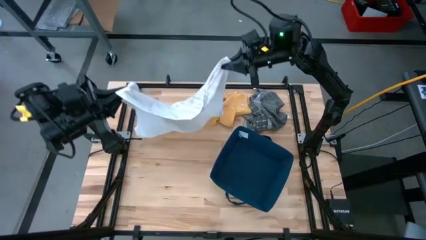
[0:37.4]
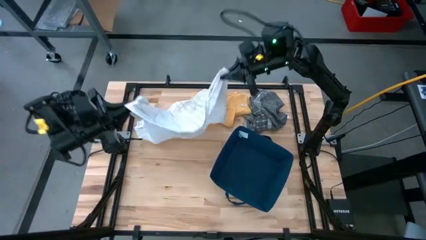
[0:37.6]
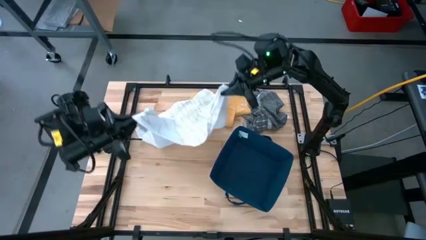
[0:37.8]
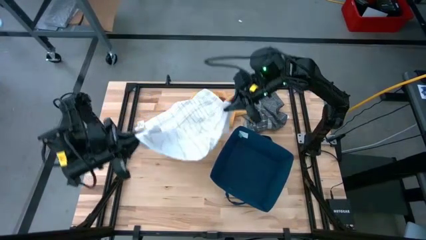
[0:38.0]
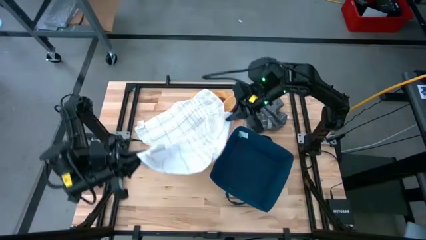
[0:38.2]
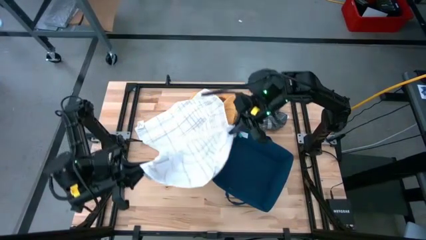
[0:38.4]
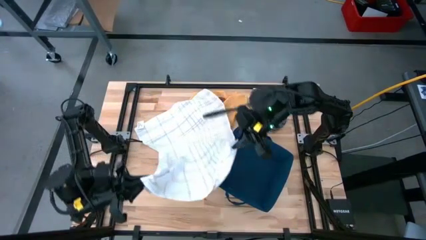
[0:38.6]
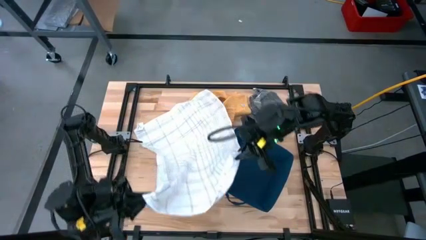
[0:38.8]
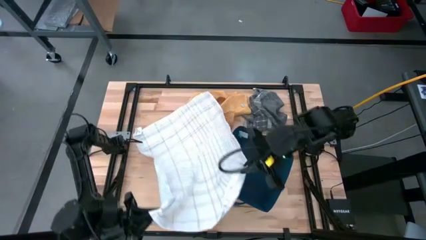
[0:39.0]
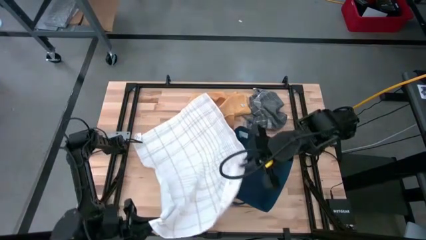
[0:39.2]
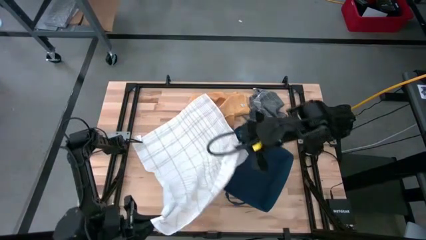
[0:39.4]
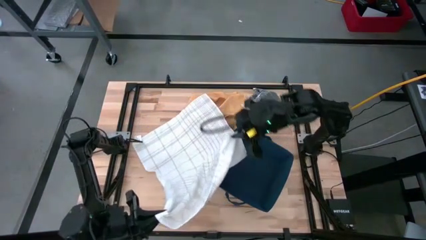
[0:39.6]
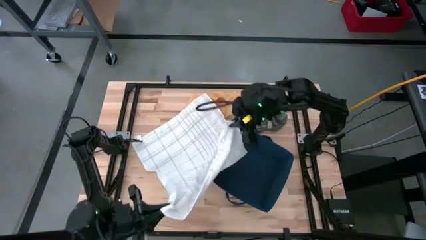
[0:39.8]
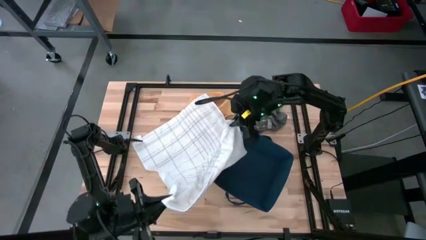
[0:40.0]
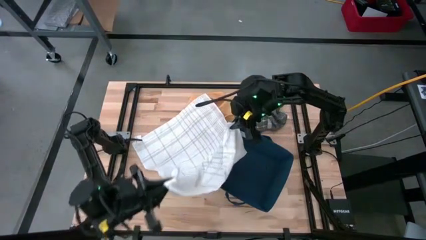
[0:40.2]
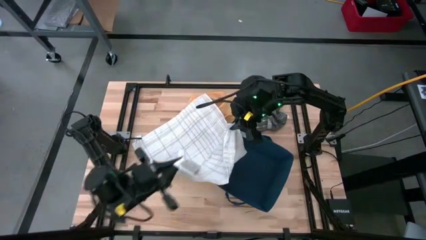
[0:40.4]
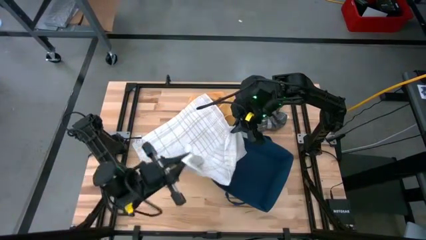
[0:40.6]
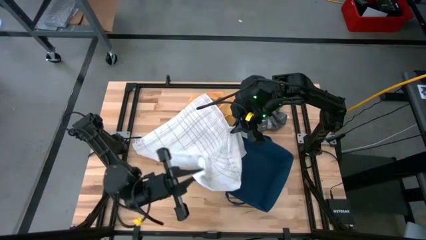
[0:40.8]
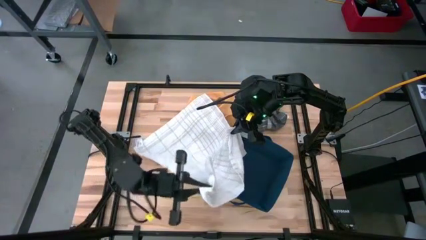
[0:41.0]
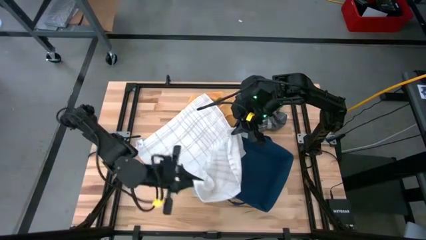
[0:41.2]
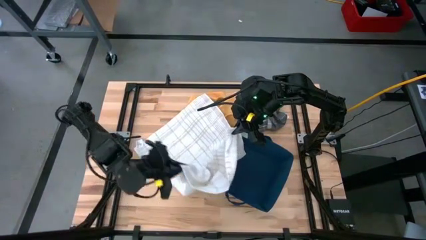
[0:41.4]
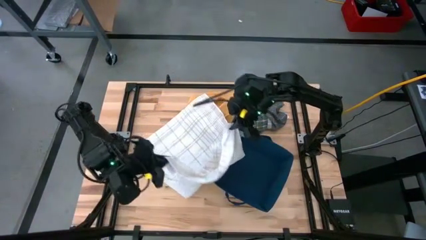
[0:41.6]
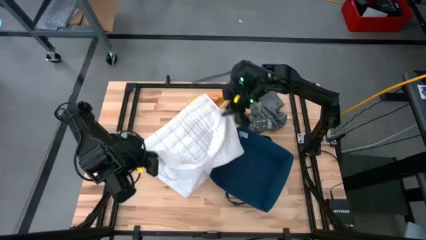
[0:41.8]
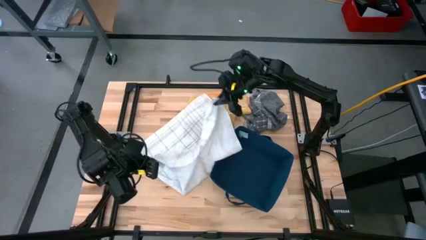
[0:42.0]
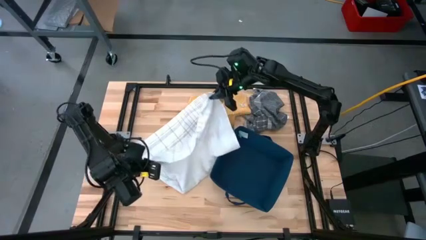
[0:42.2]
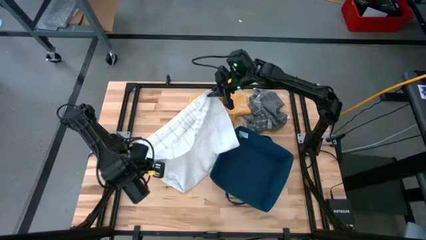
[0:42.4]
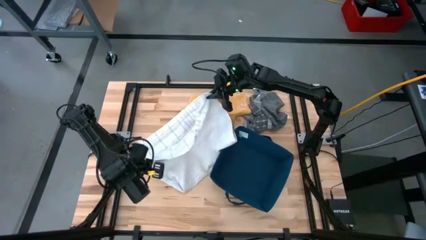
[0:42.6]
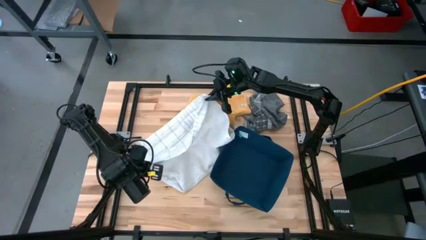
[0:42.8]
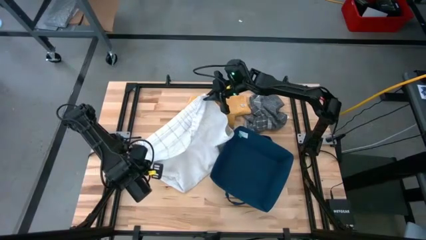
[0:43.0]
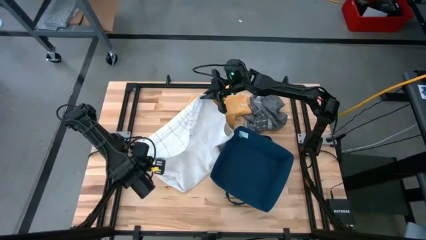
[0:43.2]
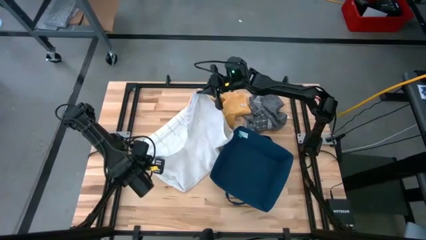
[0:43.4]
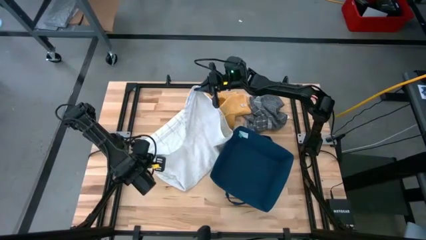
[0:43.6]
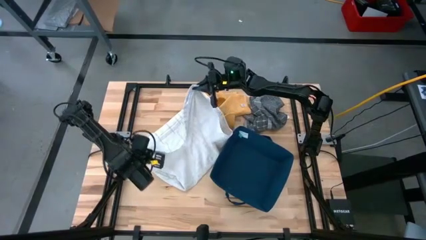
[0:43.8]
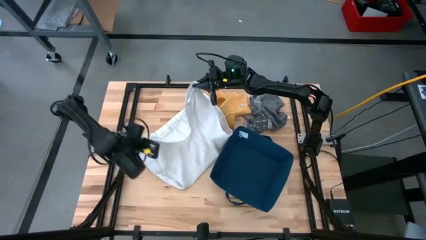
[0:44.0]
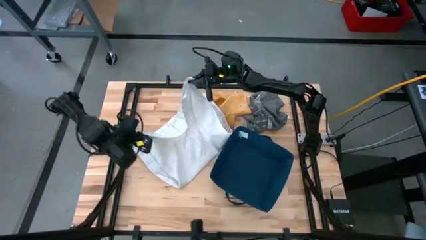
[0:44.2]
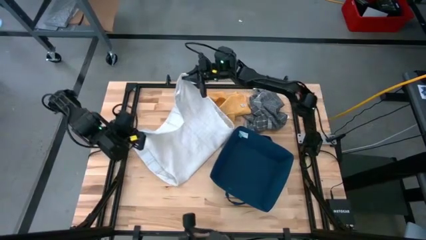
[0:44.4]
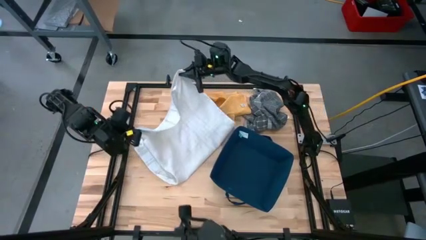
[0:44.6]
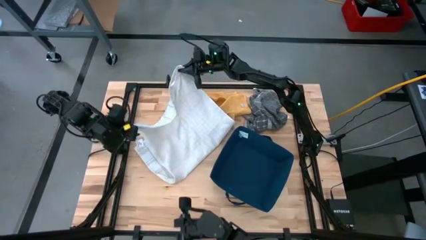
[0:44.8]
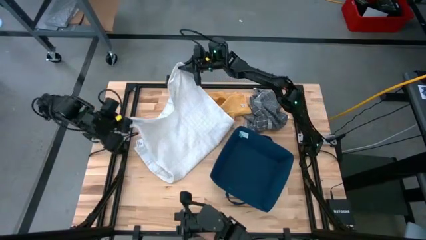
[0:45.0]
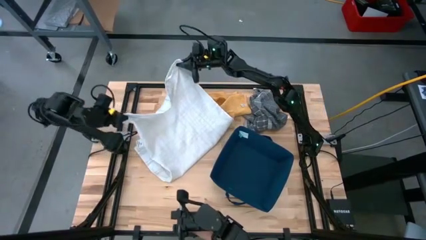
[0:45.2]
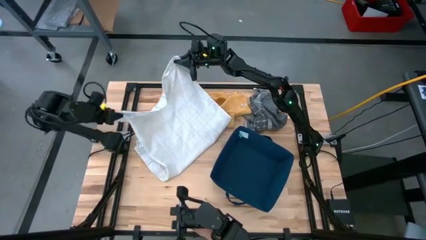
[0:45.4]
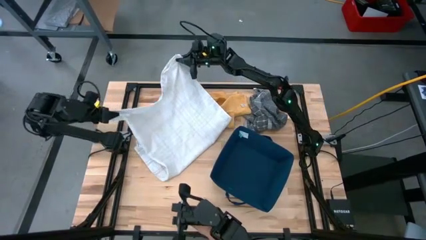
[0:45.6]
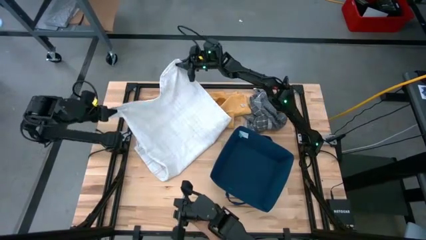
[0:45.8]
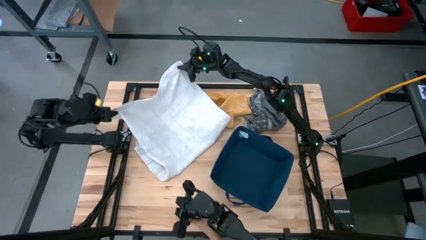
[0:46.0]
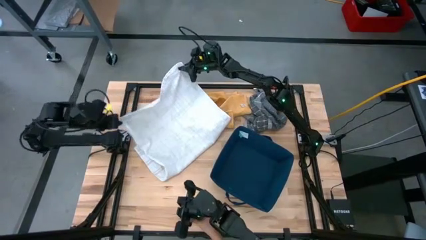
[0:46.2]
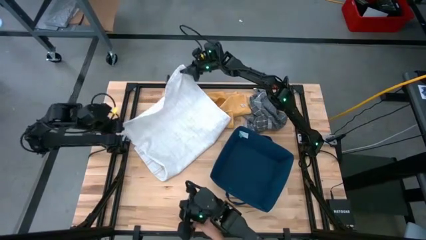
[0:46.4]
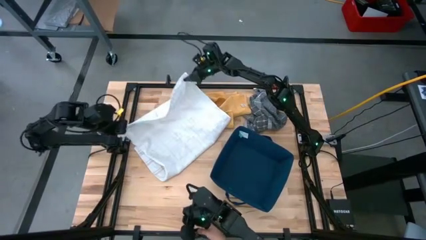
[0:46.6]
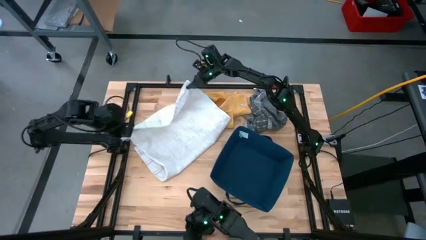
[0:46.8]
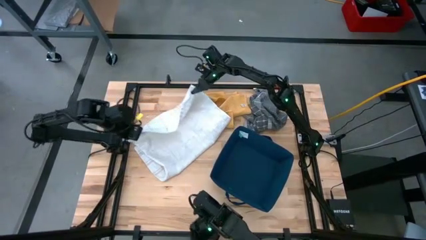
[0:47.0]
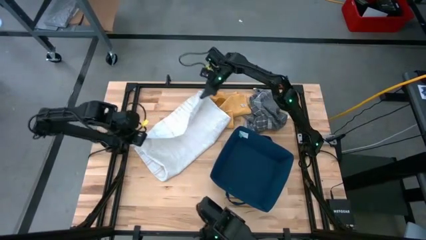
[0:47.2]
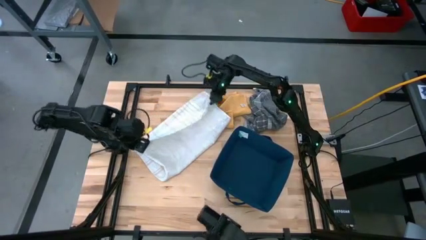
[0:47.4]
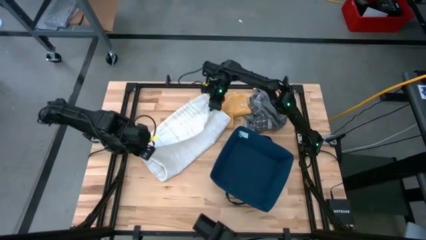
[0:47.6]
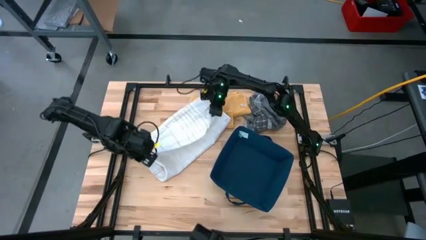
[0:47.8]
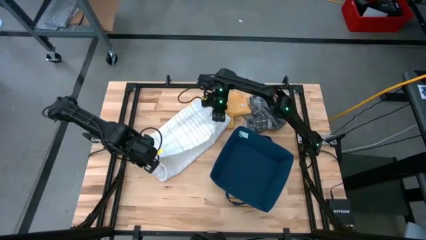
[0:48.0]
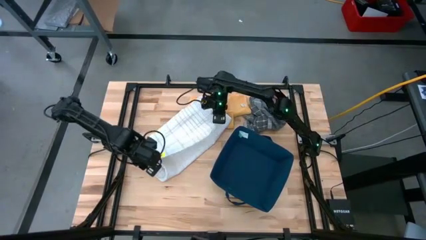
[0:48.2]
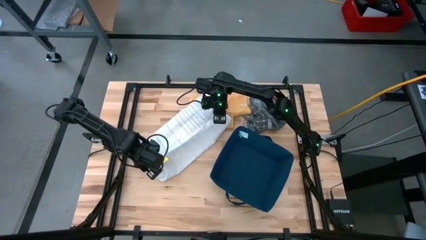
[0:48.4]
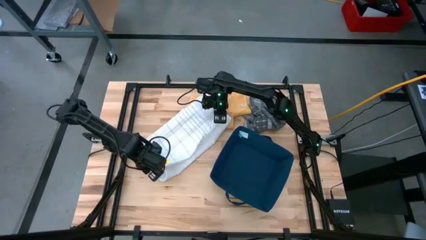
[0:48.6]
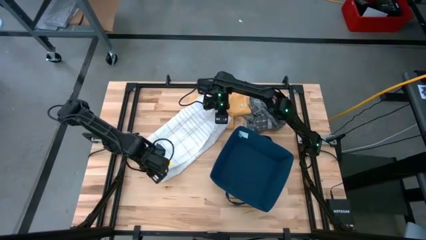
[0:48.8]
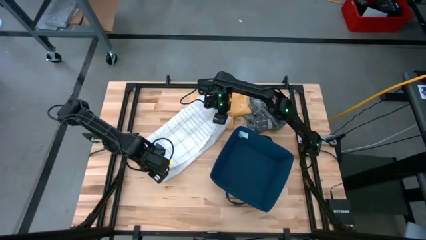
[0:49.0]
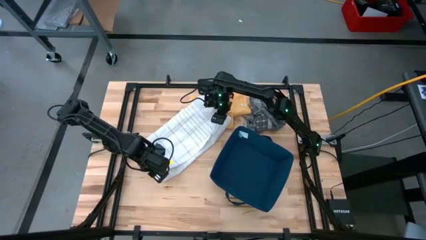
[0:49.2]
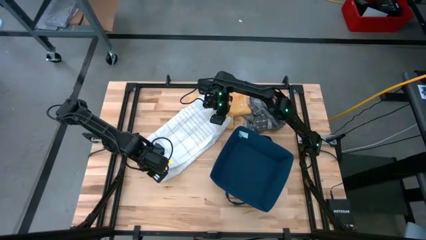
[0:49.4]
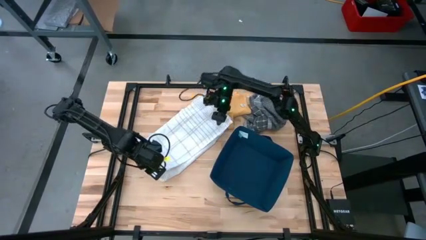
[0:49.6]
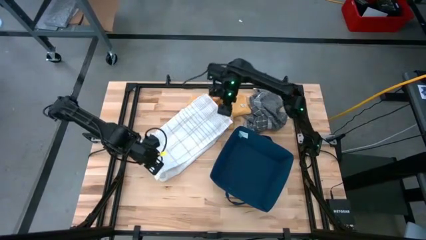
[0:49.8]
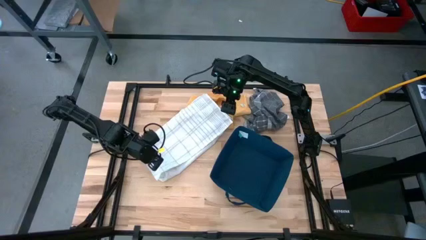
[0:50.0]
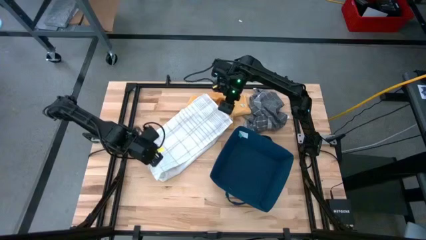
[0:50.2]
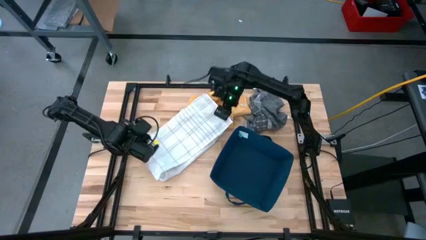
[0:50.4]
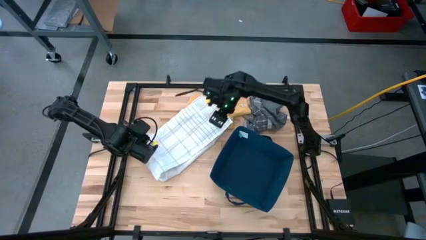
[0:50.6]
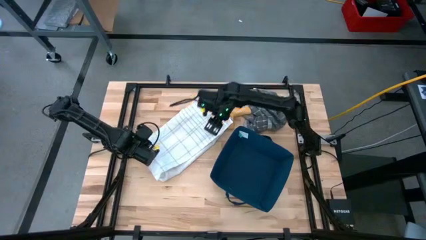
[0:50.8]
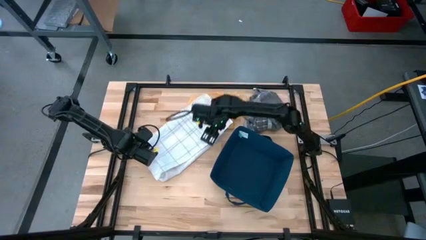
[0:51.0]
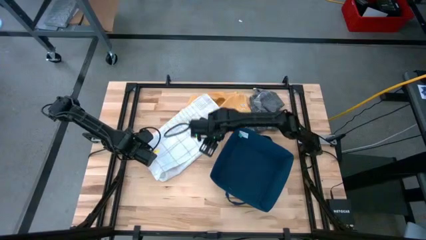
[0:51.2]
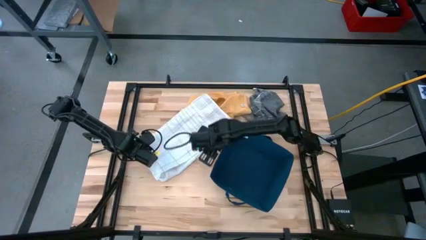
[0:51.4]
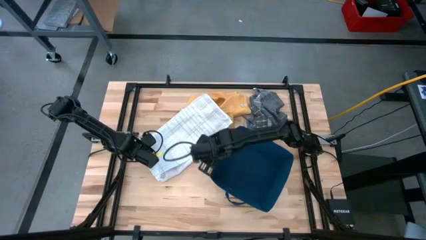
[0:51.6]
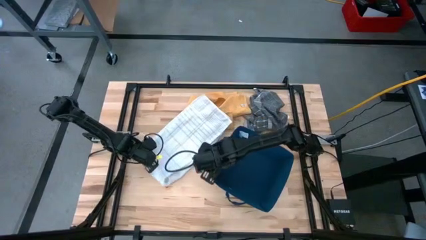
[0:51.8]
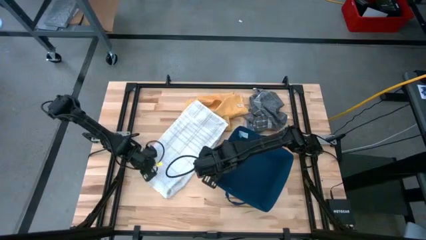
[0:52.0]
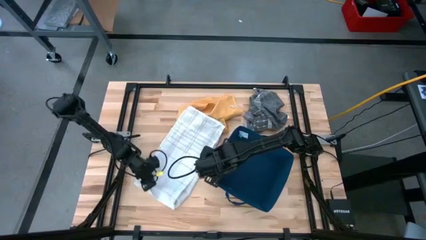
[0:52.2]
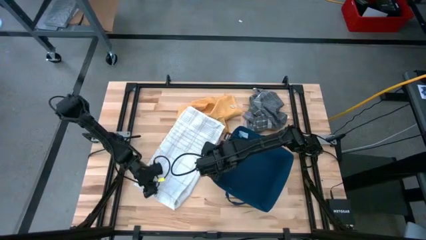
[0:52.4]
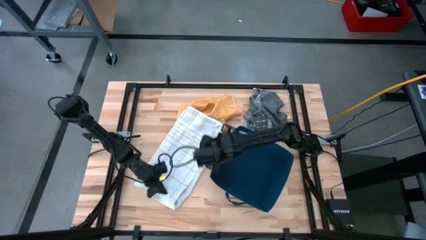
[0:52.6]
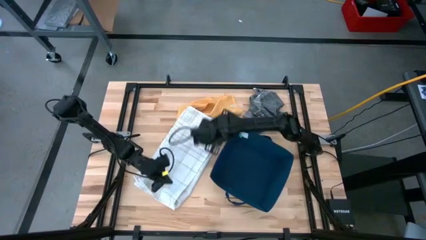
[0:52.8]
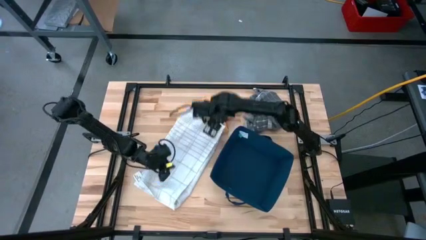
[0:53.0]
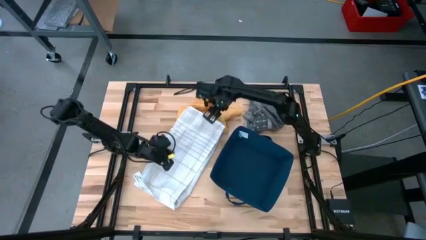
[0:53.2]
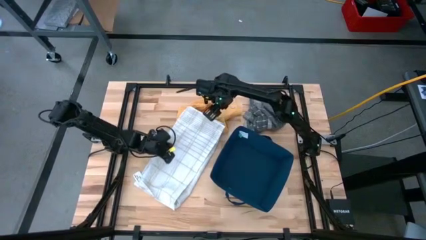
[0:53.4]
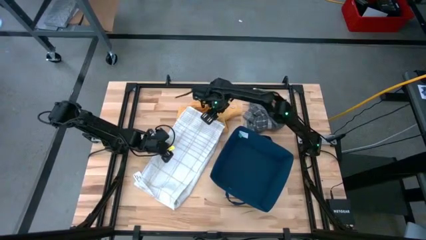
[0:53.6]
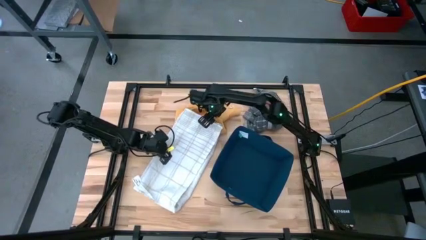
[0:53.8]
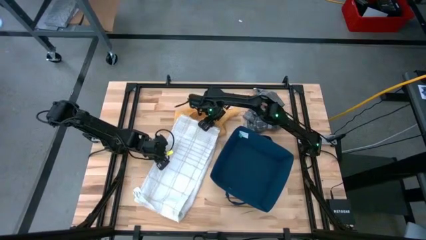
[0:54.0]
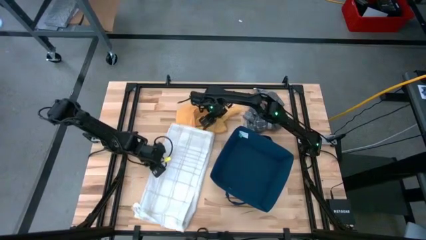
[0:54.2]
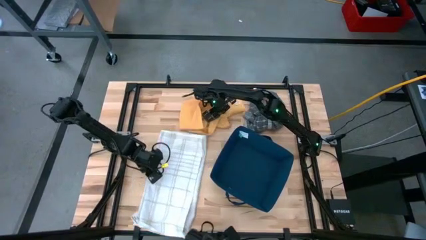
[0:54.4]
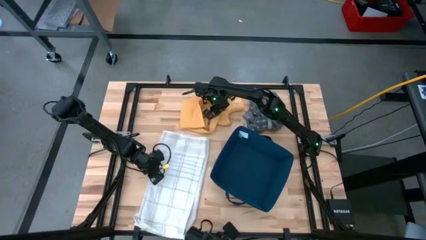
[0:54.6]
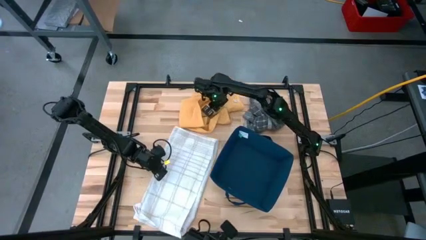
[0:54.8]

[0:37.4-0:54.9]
Task: Fold towel
Fold the white towel
